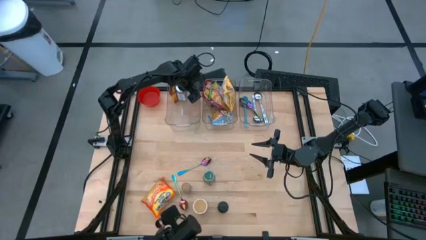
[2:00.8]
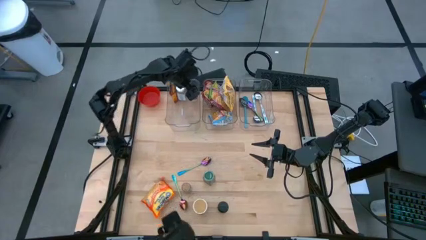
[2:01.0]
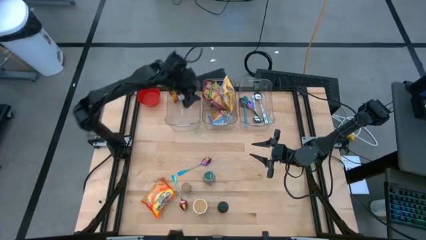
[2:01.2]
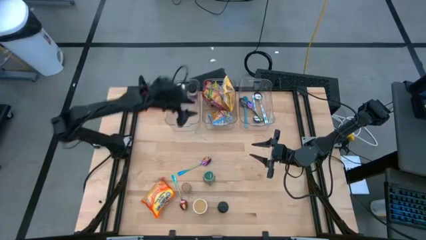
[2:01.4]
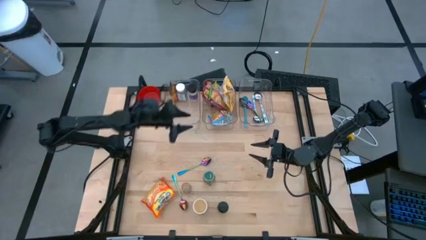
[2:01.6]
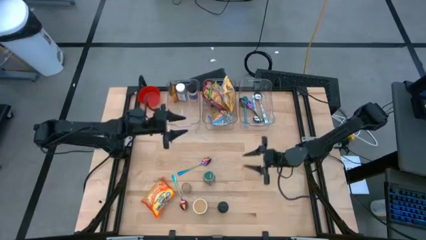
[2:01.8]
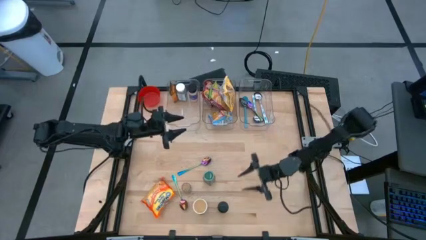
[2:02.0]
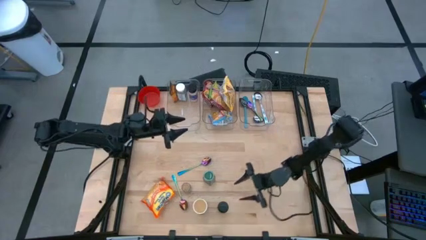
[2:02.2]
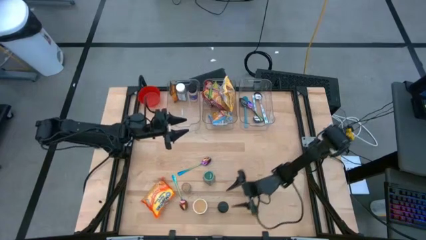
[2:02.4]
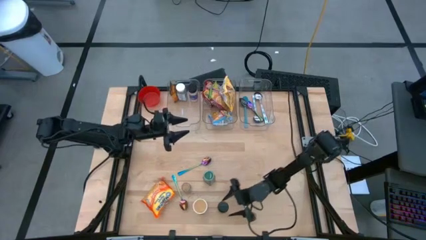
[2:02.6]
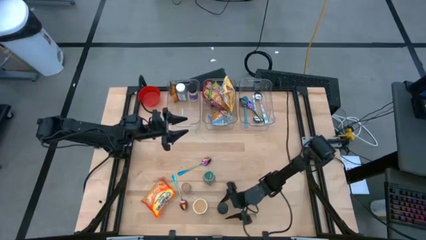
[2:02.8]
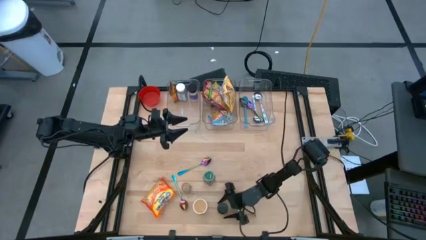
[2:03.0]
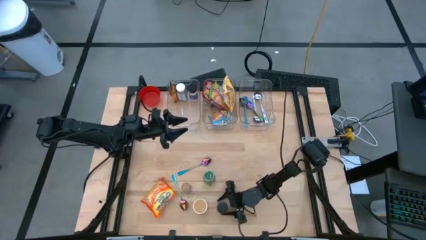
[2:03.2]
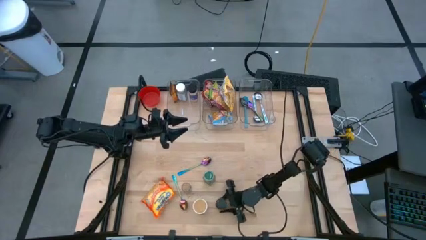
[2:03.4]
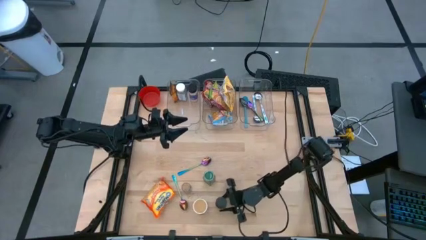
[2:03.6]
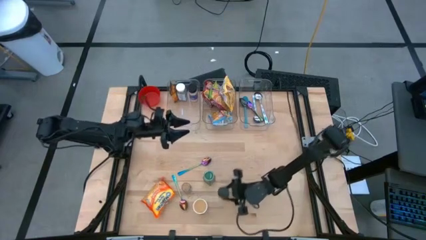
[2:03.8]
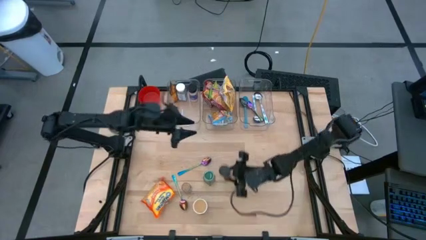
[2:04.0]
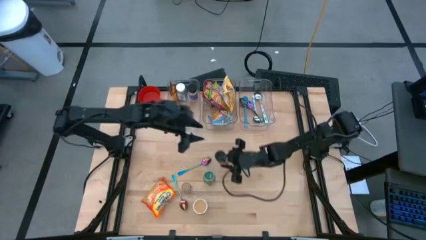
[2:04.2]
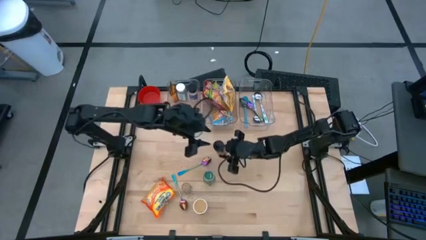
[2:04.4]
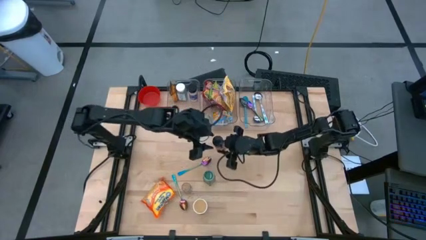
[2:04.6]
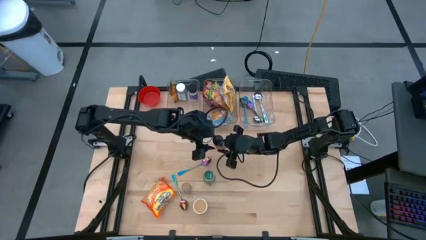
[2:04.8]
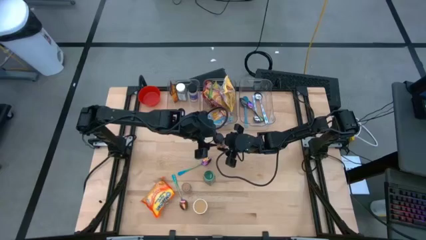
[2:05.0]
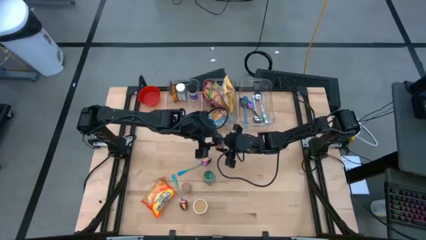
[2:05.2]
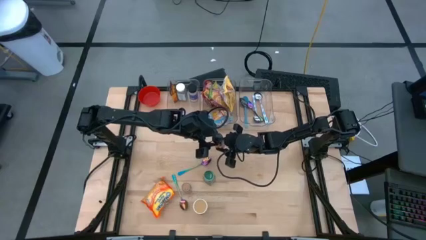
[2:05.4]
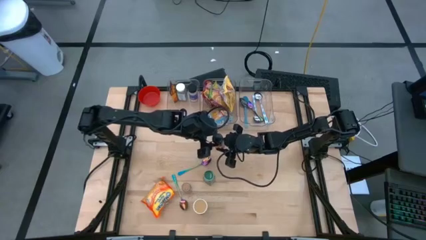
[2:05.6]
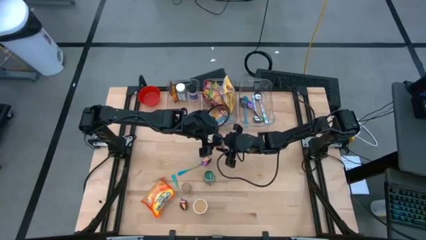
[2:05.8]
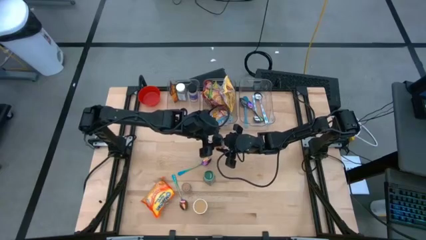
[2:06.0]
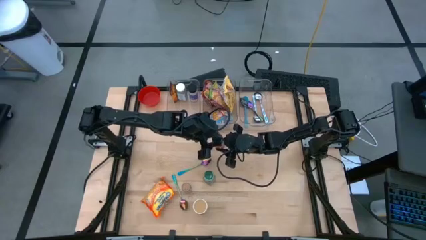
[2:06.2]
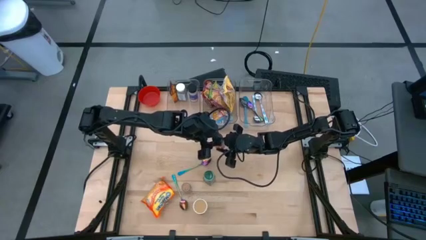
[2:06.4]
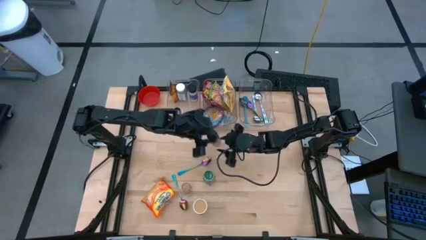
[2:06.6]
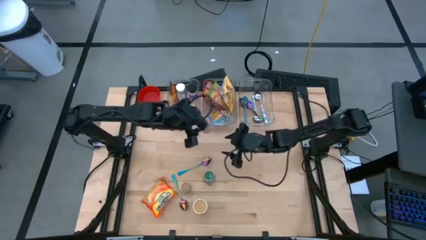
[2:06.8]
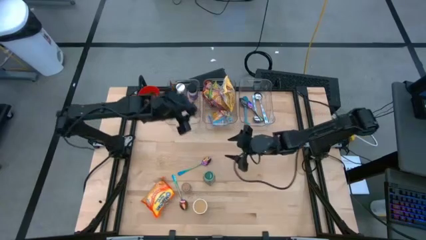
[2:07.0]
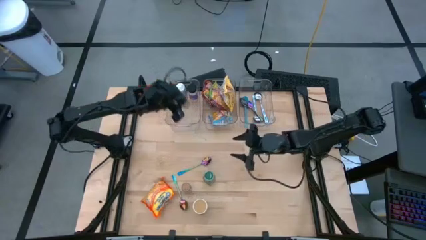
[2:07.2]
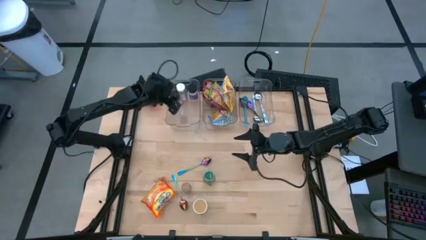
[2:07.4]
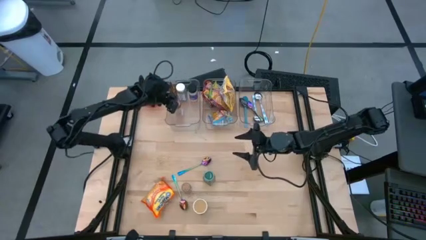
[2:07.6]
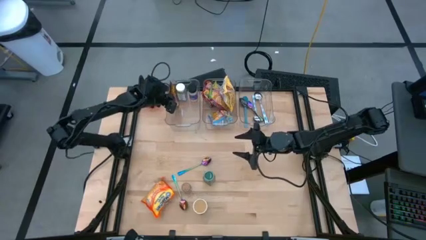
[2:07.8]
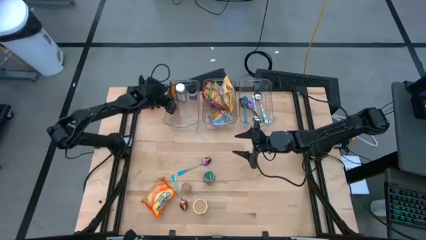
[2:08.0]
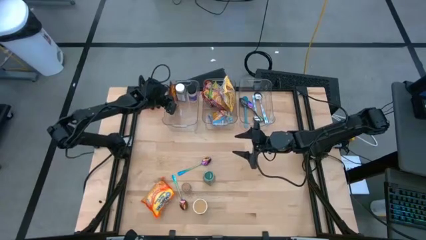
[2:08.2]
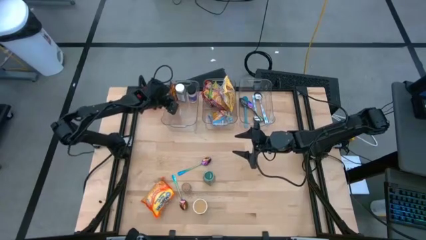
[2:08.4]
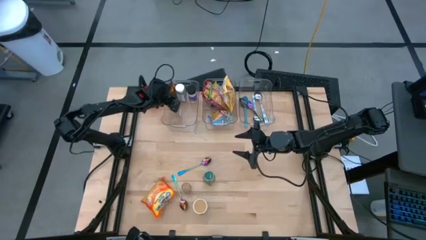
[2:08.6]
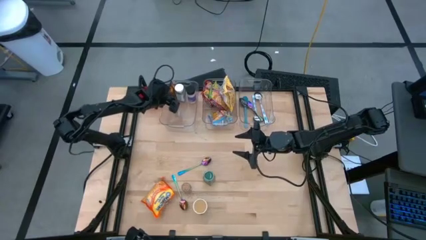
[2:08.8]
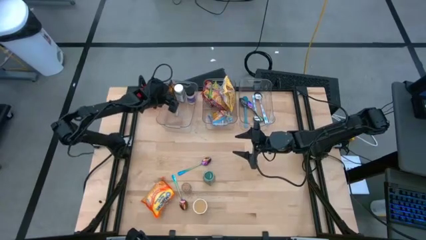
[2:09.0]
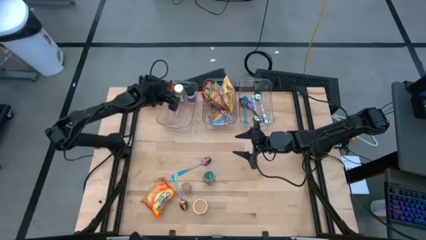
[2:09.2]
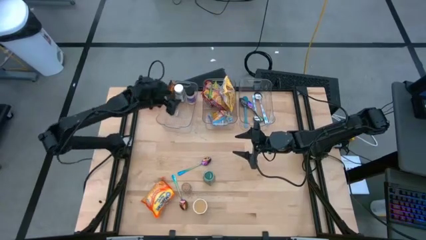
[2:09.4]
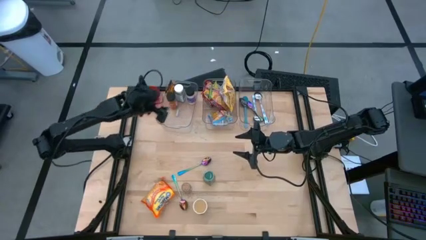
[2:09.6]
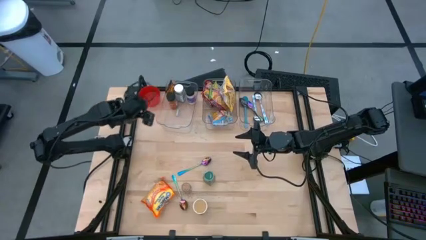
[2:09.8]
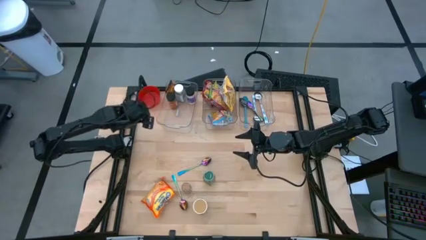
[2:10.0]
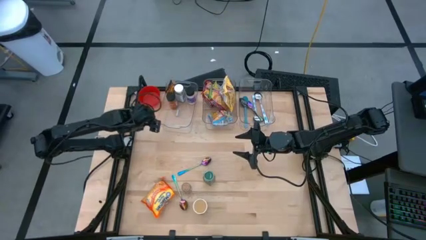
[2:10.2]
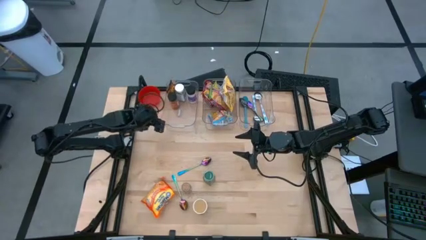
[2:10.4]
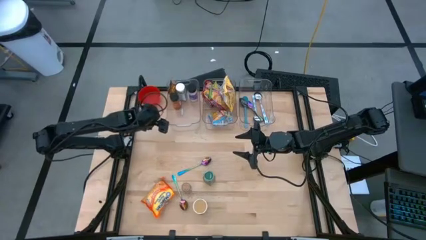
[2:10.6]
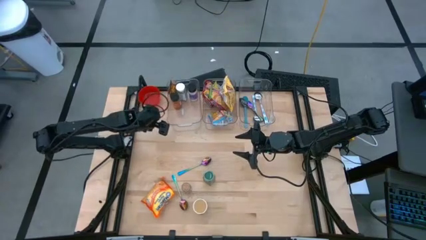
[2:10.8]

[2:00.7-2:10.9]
Task: Pick & Place Food Item
Put the orange seasoning bottle into the left transparent bin

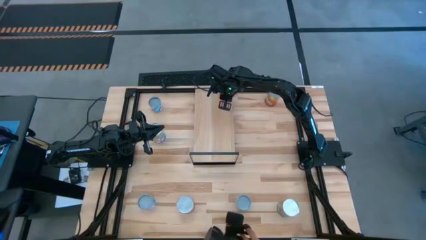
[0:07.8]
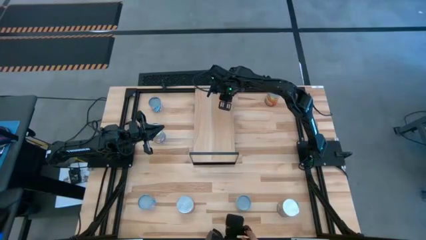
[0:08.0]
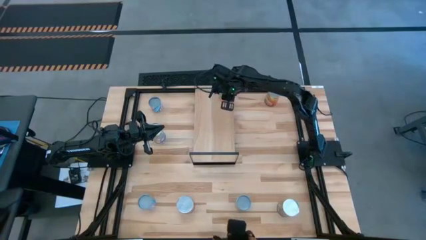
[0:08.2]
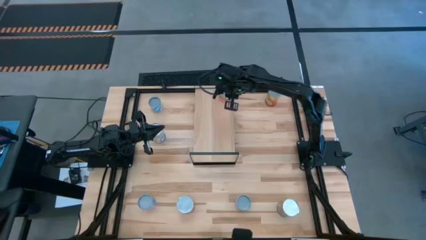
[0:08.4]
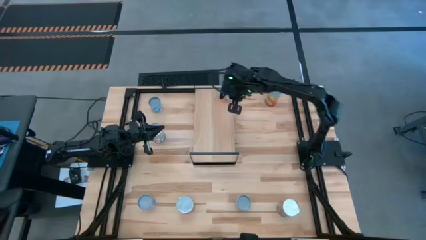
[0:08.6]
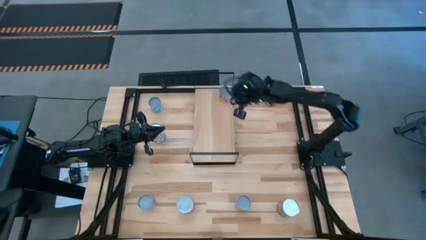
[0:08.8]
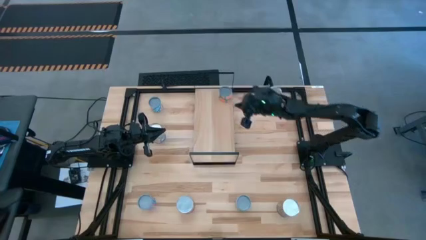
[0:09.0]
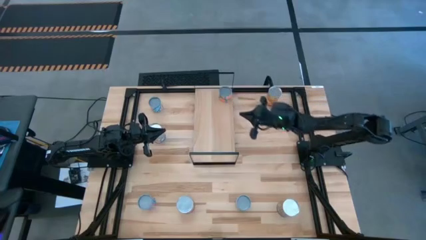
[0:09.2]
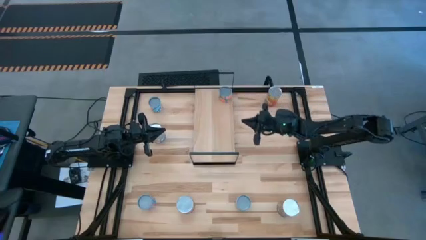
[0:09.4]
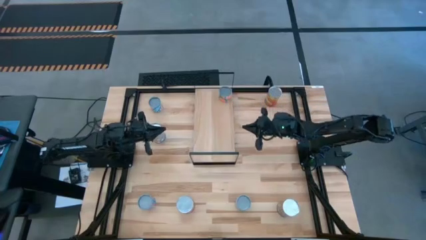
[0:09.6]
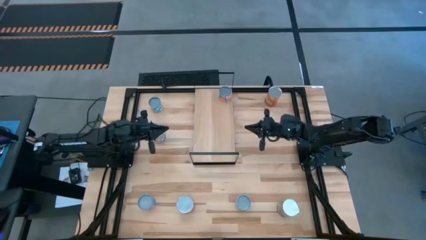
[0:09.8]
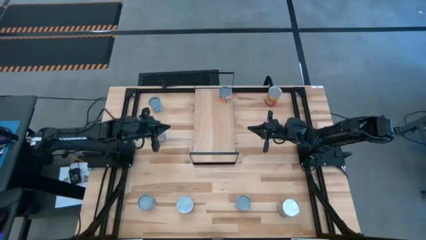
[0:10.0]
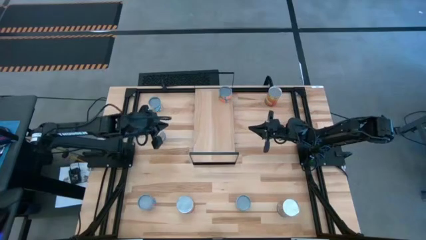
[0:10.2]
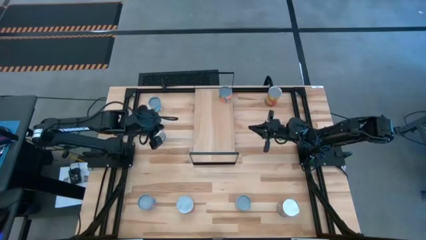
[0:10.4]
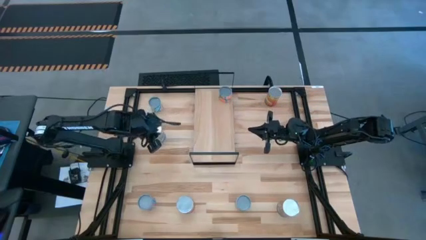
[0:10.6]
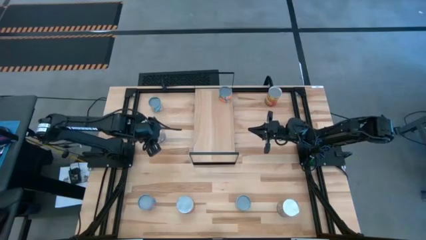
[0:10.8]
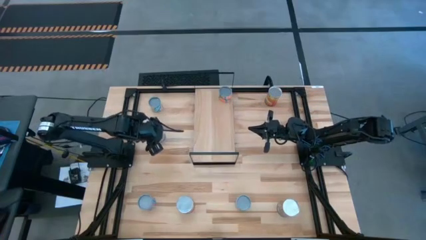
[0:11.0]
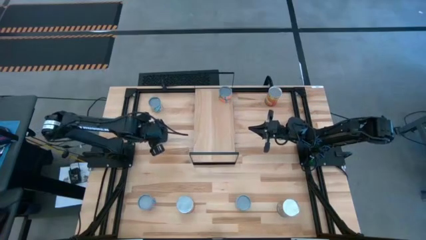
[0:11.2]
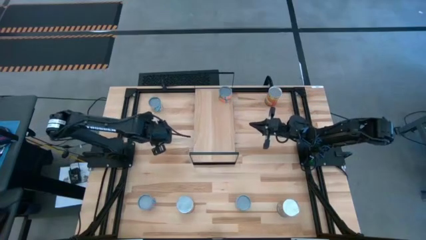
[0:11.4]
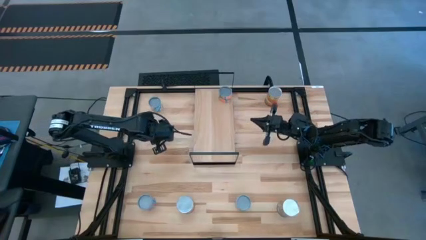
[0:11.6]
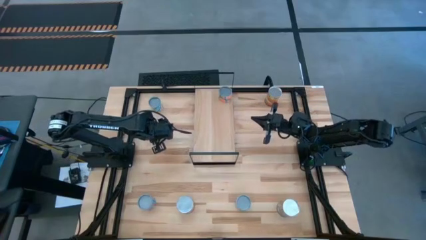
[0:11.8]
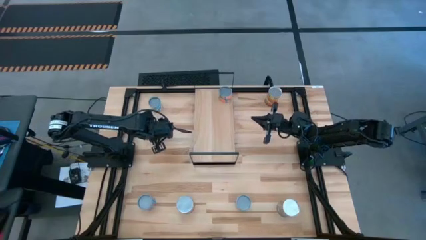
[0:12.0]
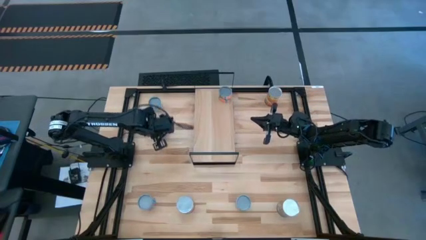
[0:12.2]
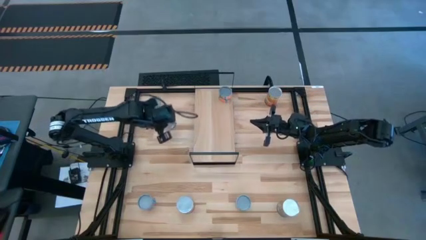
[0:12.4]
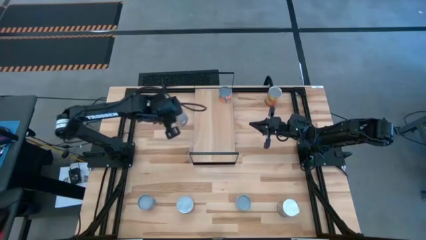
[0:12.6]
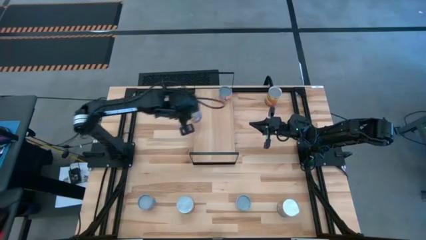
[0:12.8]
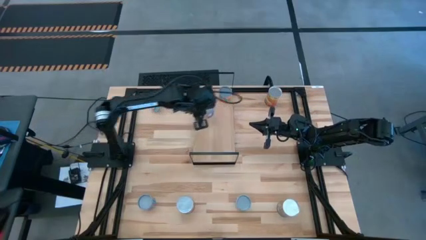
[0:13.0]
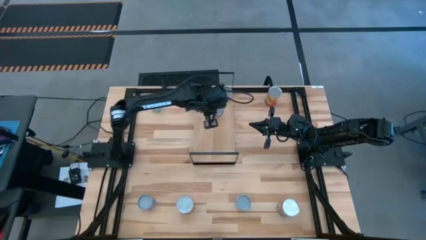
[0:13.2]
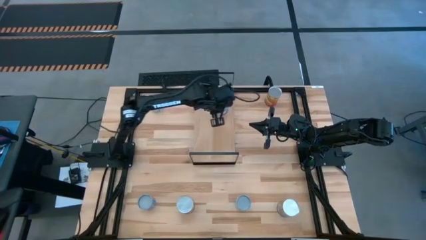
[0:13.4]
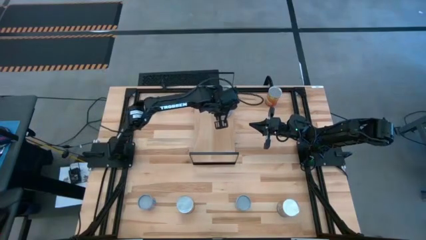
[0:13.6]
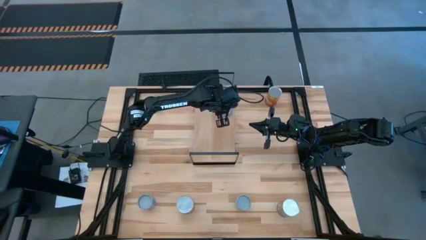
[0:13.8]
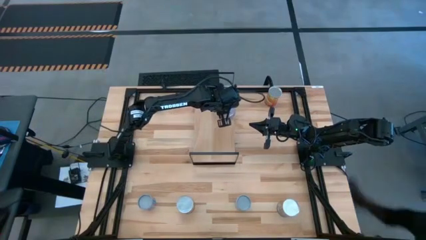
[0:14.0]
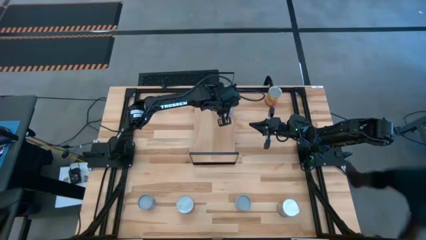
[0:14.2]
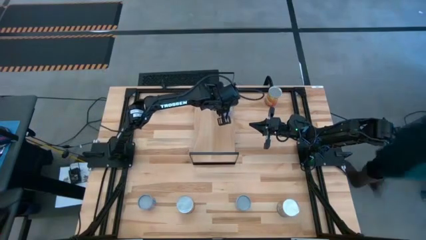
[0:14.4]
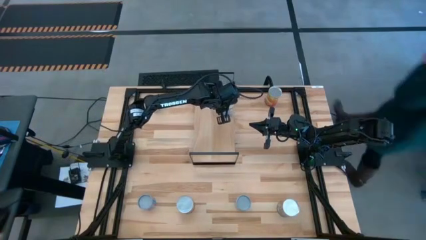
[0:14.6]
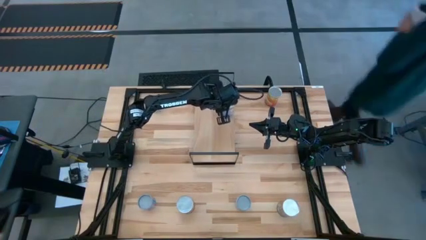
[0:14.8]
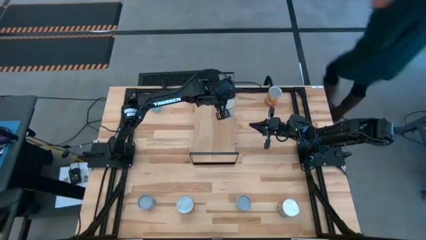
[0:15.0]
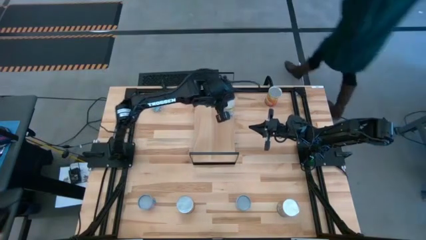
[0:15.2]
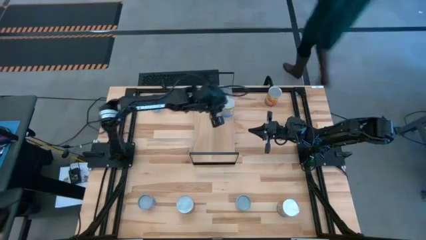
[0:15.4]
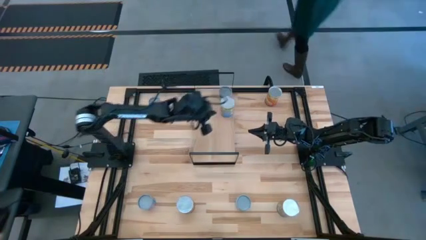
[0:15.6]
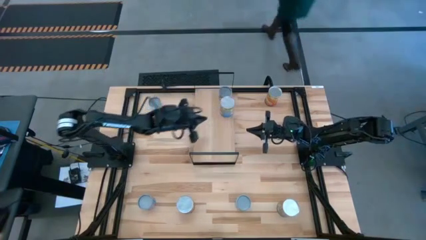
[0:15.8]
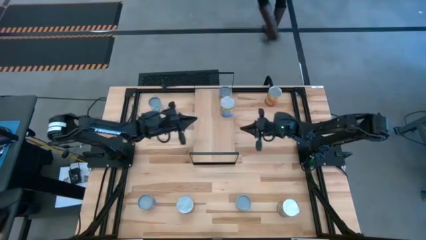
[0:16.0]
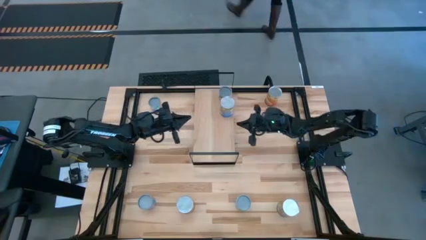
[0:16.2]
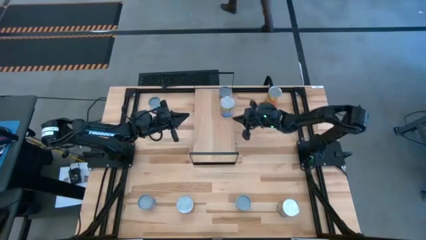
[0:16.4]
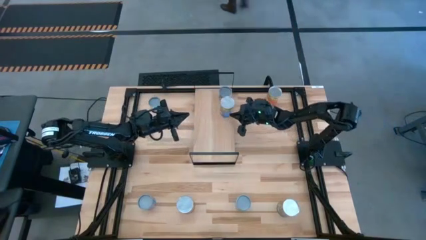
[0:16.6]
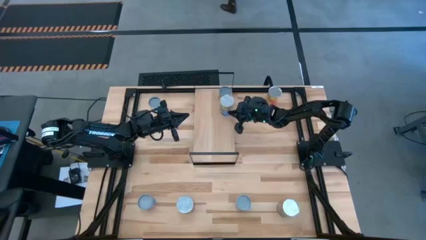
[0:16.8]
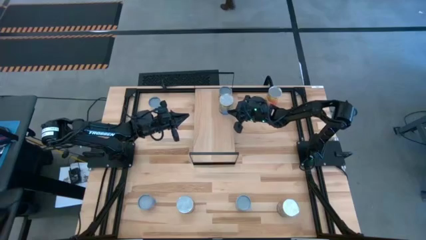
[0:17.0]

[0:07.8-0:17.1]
Task: Pick and place cans onto a shelf
Put the left large blue can on the shelf
